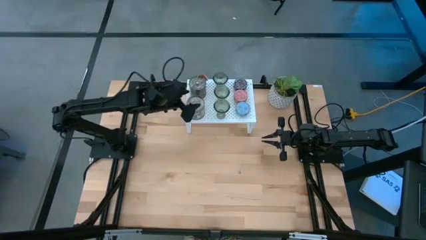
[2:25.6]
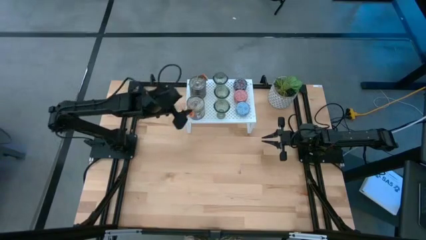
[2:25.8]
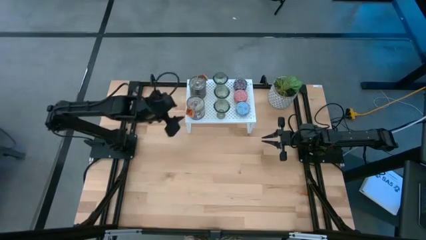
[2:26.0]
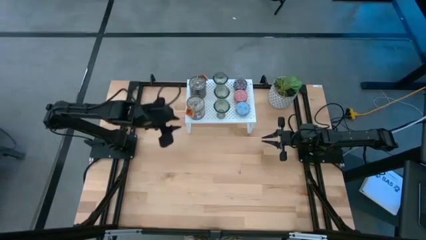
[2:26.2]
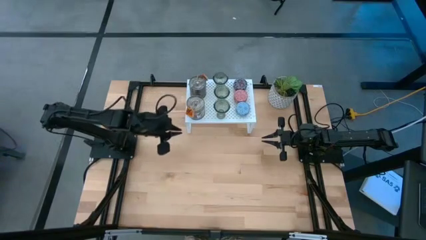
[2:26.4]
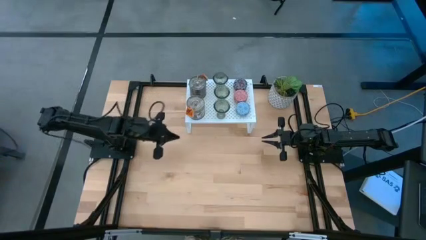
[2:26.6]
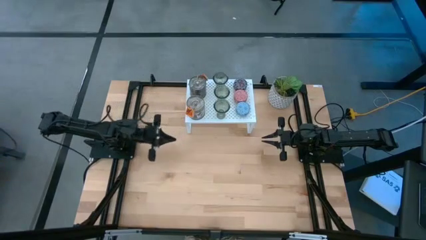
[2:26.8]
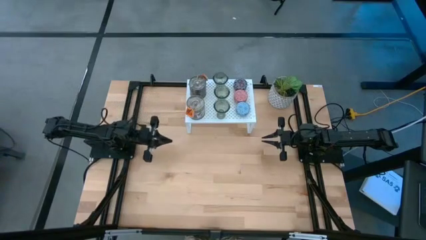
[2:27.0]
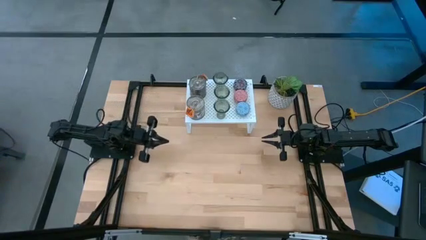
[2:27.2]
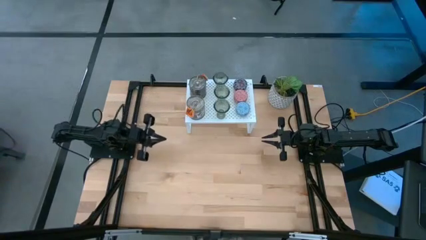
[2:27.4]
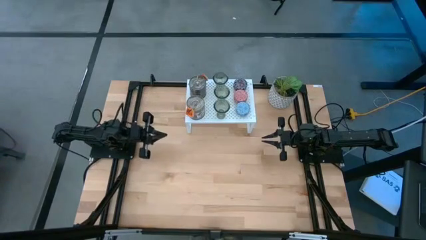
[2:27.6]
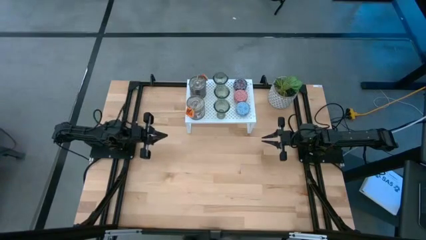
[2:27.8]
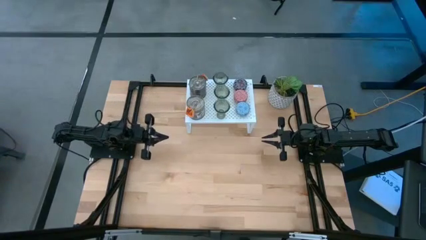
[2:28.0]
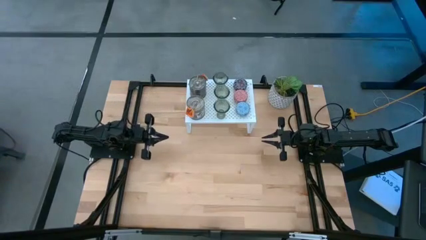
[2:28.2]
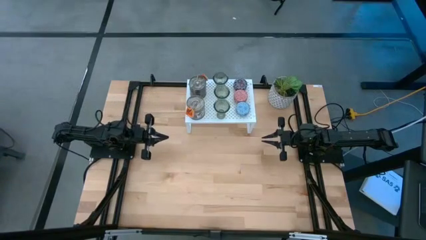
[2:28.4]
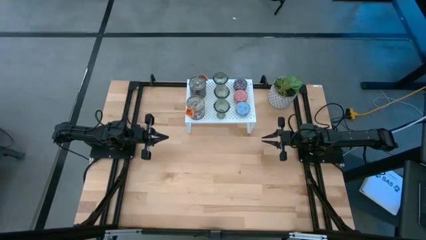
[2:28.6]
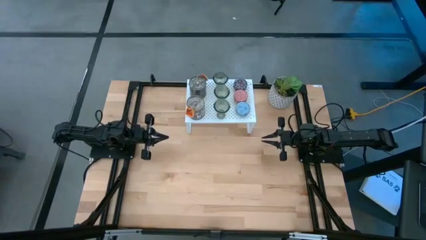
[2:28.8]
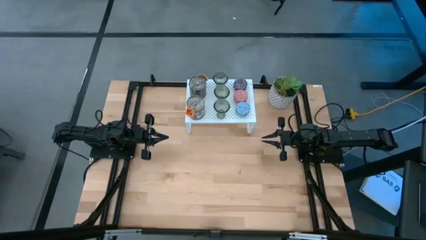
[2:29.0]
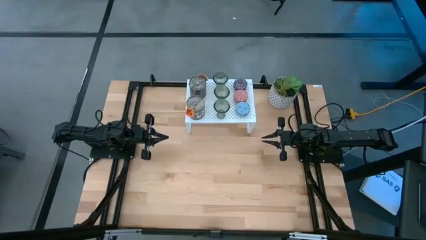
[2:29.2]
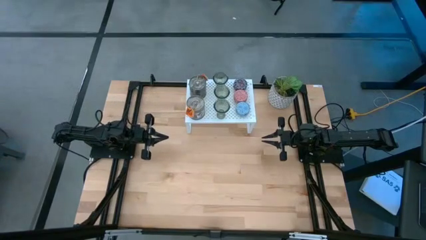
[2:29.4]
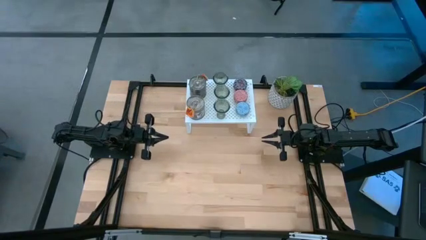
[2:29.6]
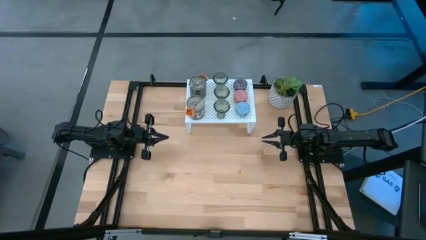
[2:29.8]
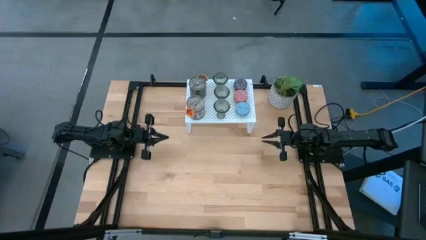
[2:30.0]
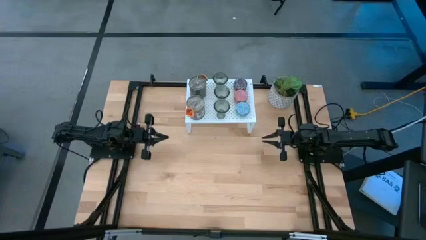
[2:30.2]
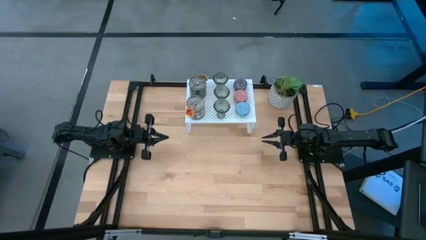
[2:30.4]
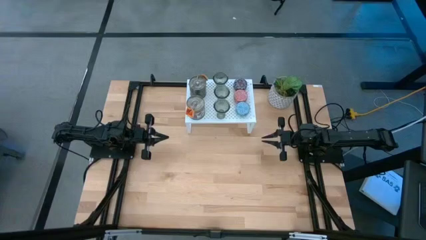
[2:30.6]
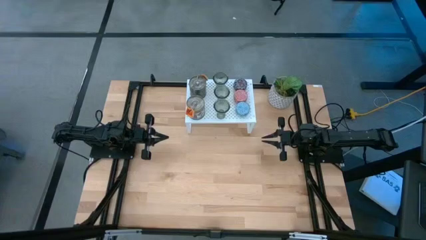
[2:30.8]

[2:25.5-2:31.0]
Task: Pick & Place candle stick holders
Return to Home Position

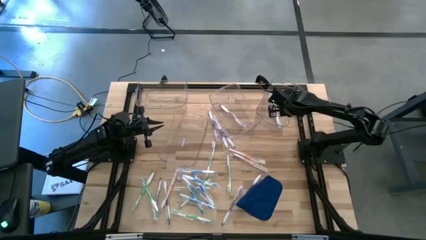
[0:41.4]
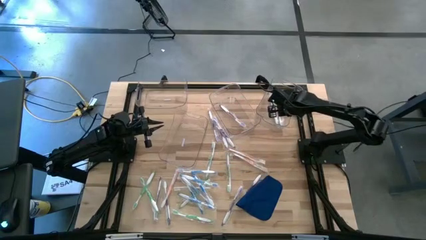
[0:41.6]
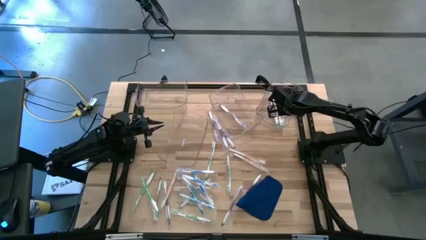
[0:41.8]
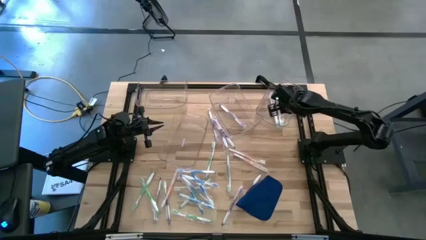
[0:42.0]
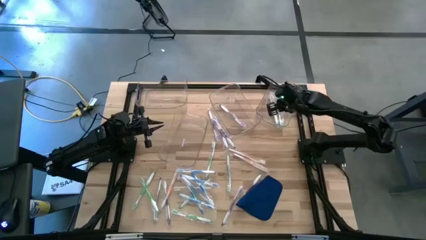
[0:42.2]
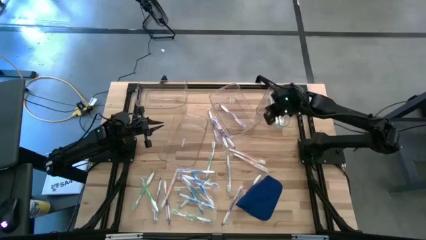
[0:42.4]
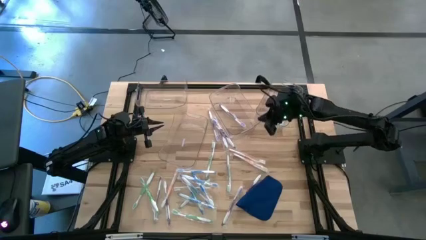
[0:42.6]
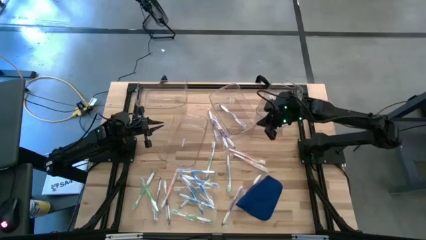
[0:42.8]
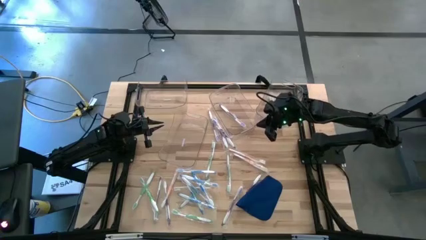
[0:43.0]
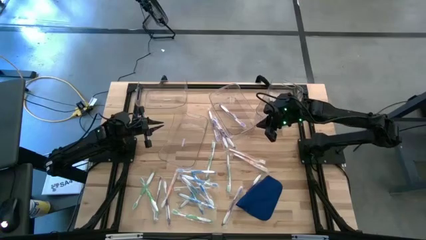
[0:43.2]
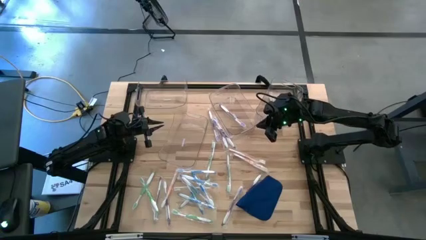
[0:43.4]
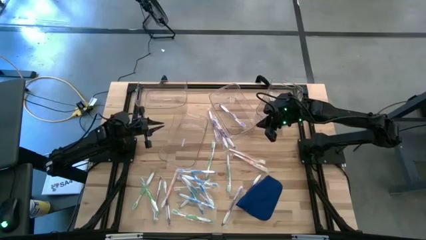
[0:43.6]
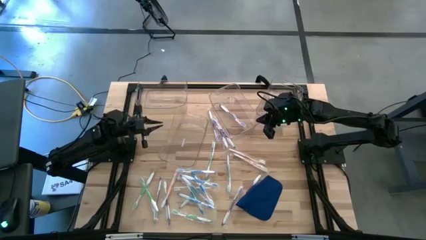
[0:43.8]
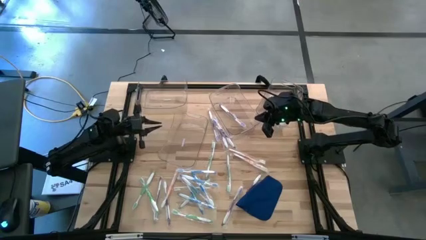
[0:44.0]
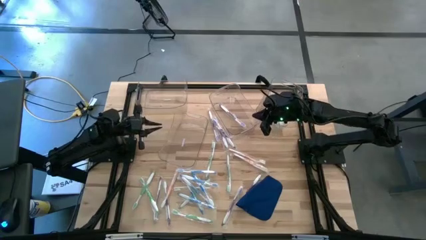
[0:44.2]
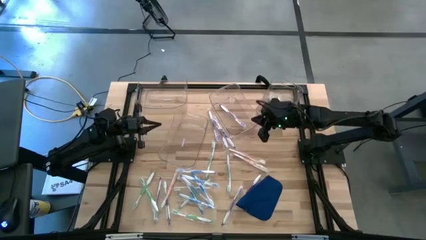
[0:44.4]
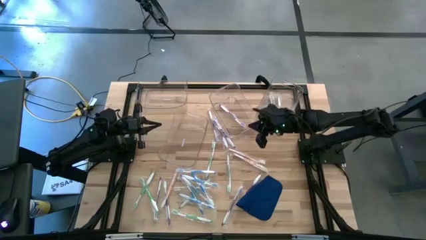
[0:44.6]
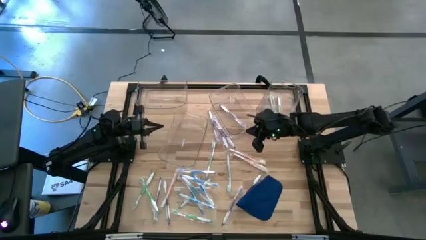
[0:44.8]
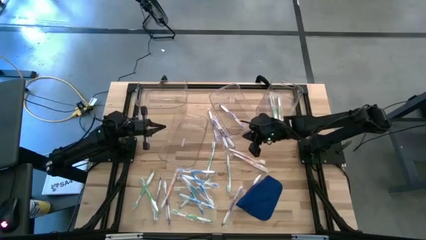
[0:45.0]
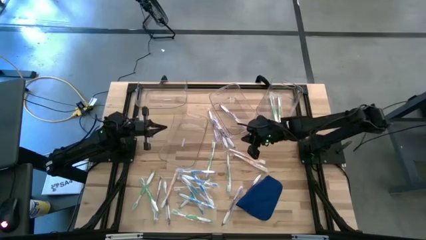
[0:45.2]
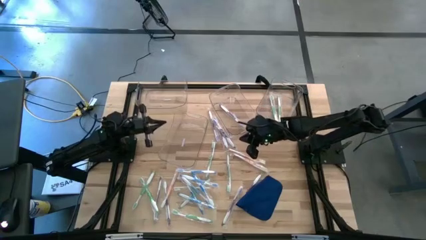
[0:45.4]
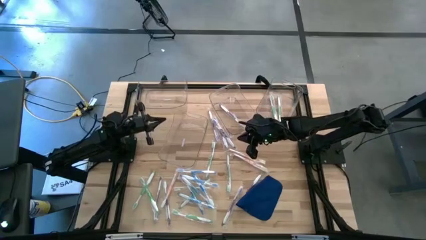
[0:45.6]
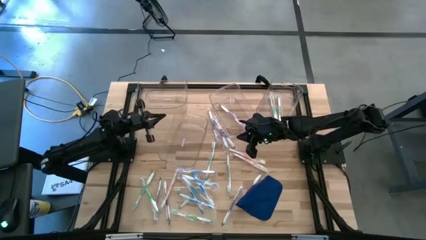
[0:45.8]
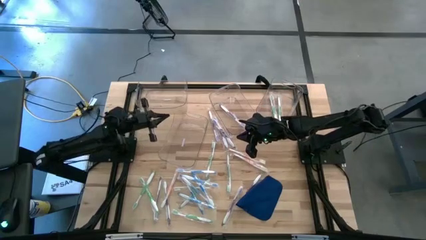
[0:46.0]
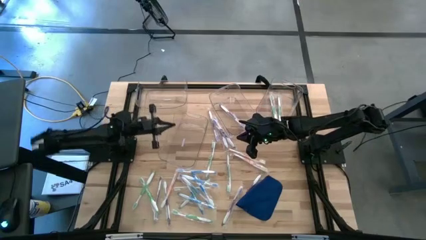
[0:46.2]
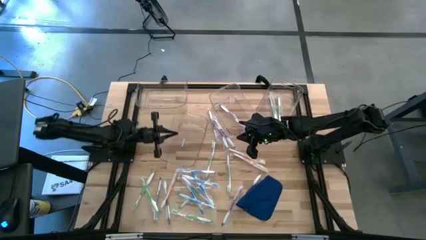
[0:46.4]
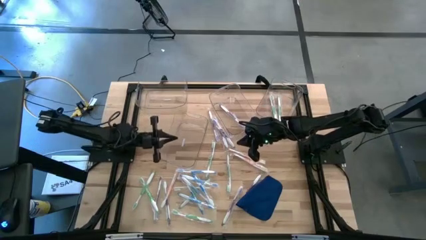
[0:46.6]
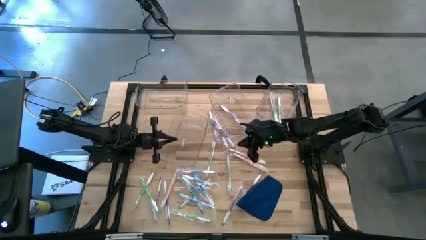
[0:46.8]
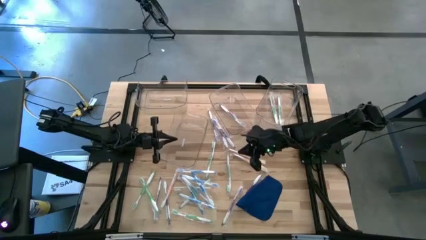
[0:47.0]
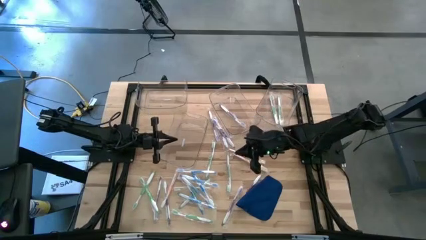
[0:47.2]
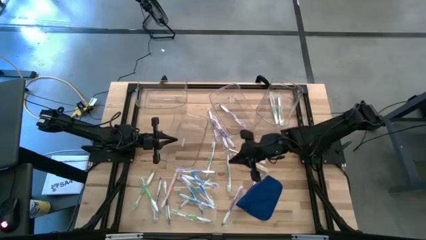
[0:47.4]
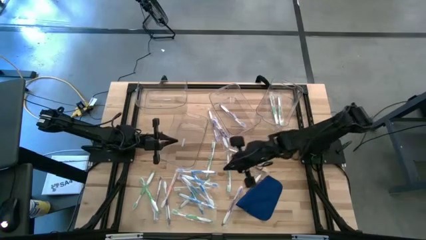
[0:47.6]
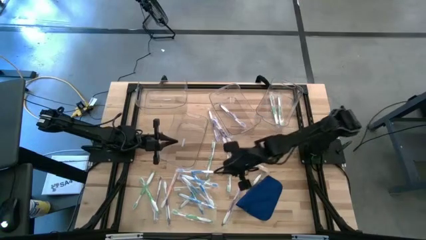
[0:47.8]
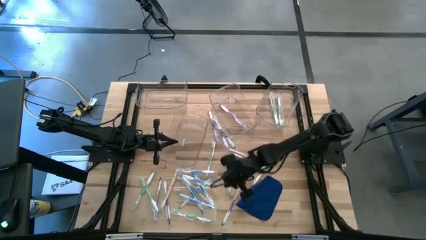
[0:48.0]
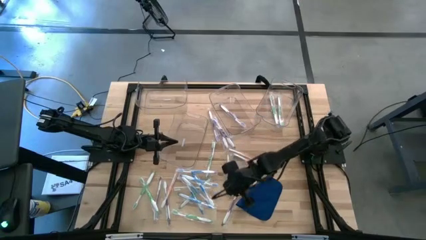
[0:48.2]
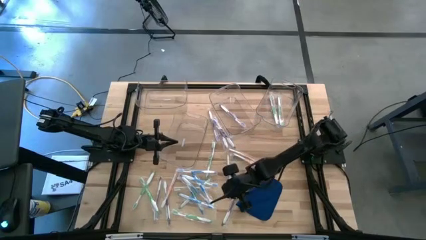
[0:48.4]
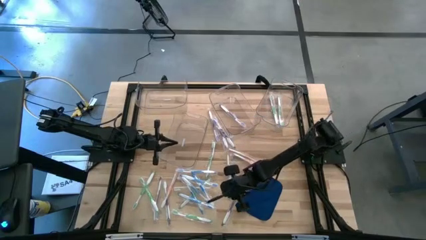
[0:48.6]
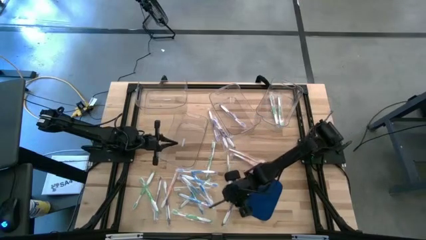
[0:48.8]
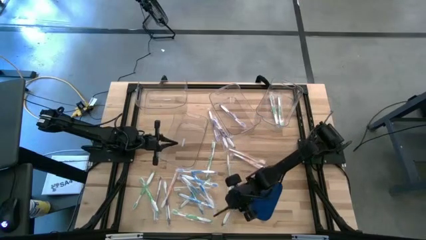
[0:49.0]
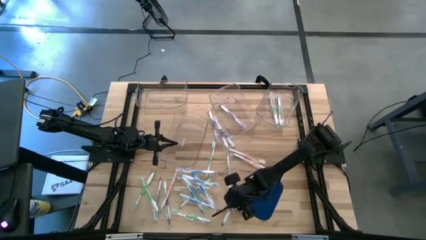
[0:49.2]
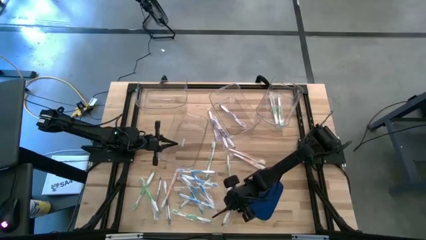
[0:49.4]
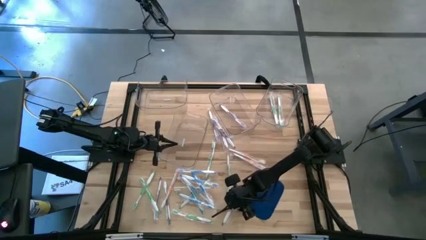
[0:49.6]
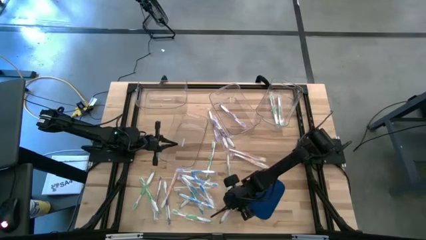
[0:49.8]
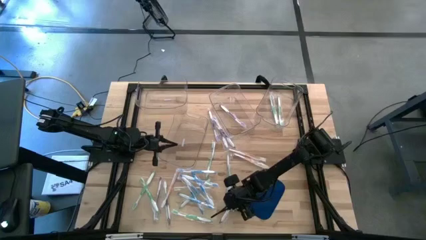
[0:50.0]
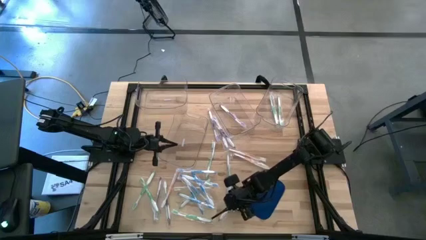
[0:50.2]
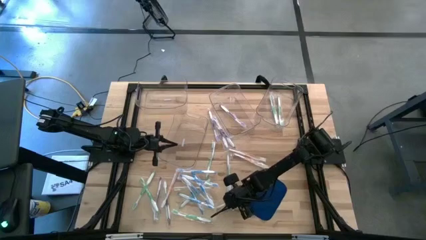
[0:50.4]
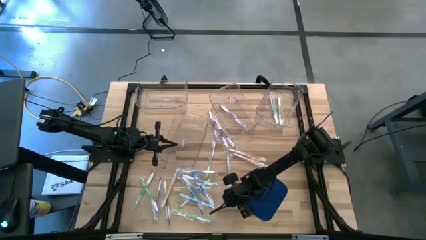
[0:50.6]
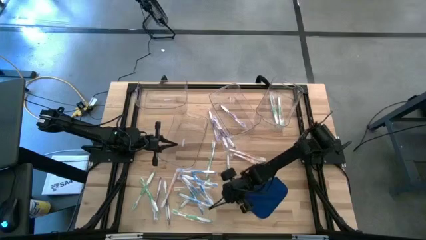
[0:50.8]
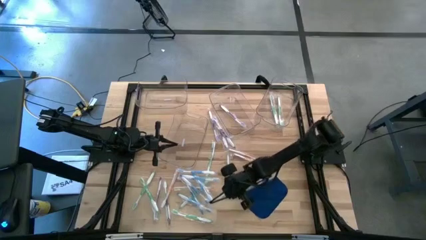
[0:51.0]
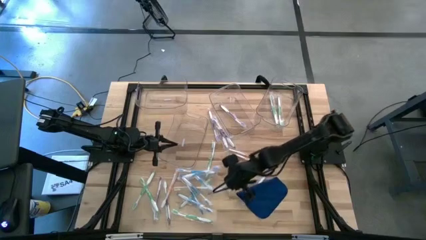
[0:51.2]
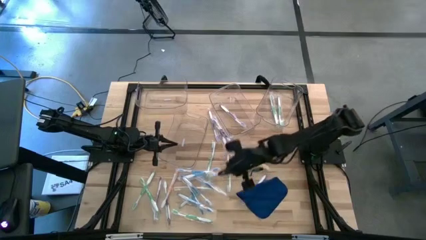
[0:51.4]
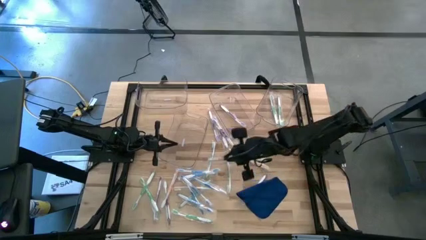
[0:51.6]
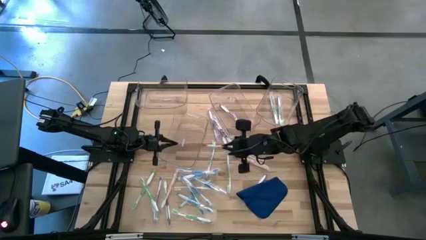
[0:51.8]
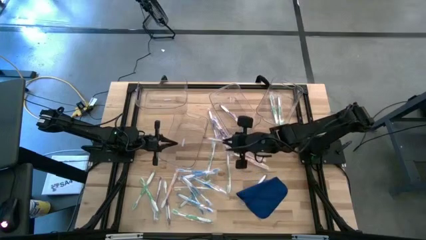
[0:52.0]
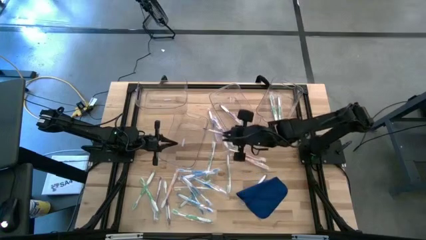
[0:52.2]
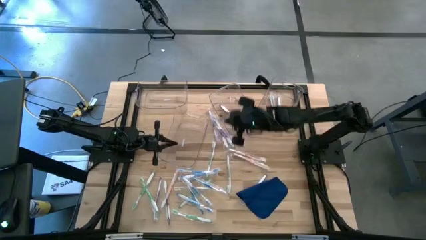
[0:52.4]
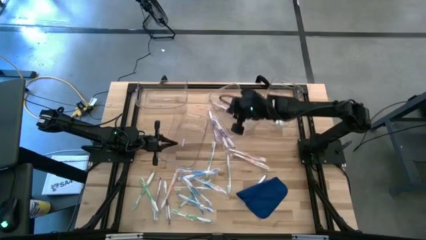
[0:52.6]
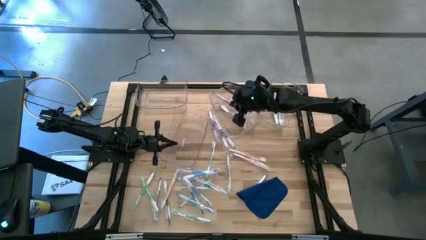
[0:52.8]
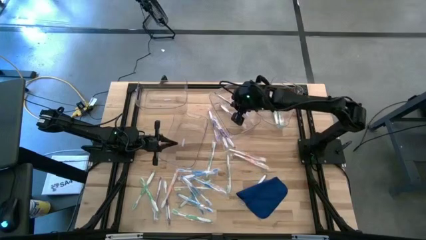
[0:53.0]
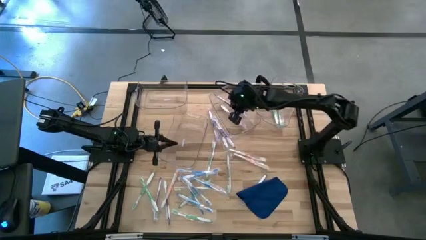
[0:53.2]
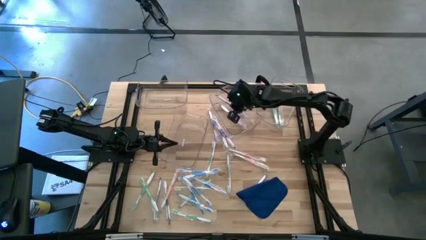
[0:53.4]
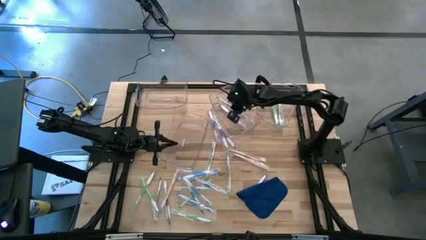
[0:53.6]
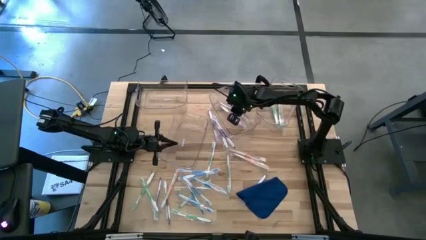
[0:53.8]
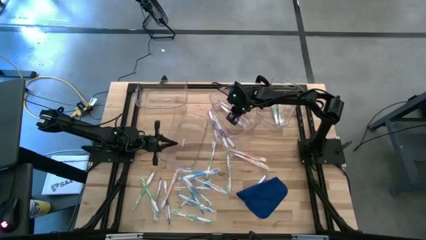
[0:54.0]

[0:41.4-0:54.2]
Task: Pick & Place Toothbrushes
Put the purple toothbrush into the top center transparent bin
